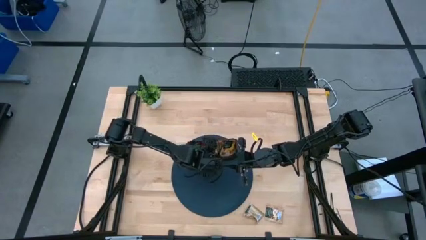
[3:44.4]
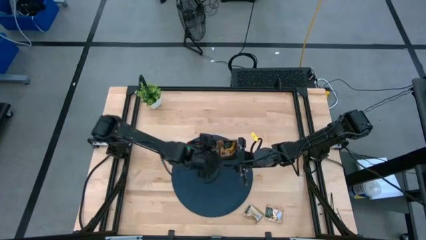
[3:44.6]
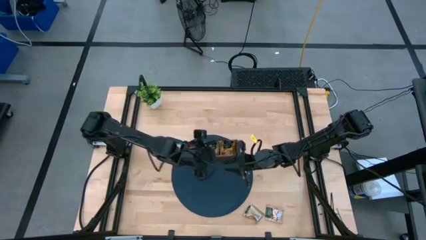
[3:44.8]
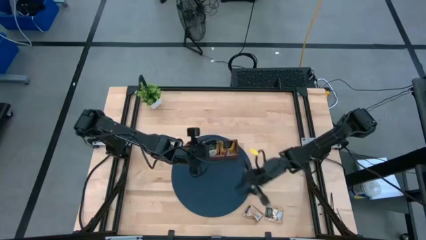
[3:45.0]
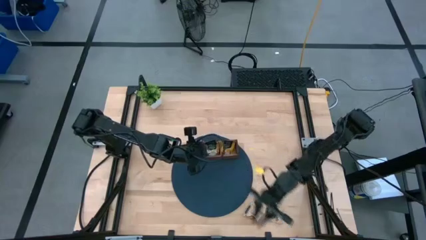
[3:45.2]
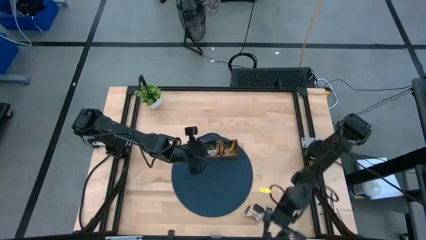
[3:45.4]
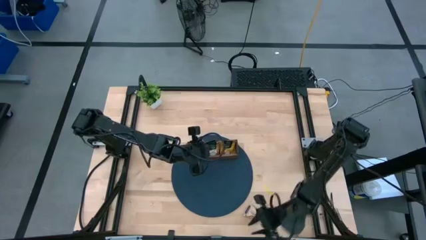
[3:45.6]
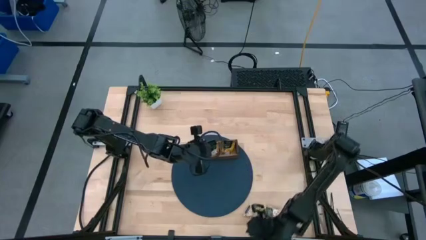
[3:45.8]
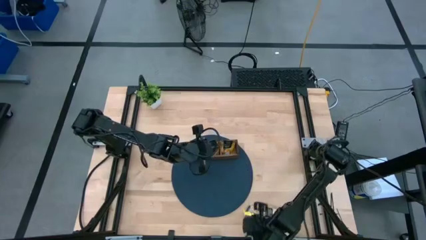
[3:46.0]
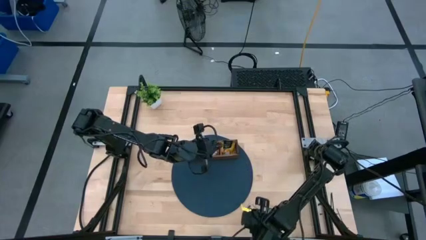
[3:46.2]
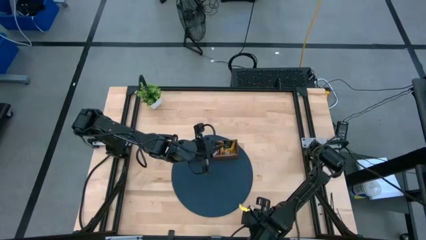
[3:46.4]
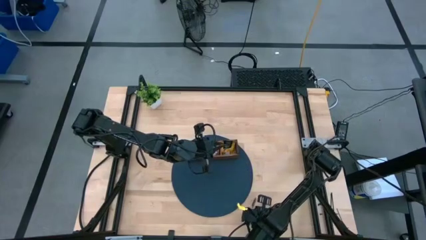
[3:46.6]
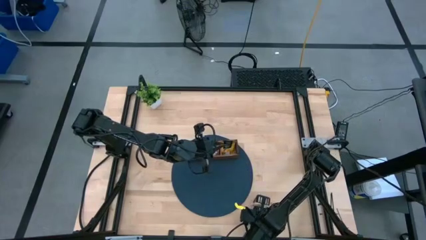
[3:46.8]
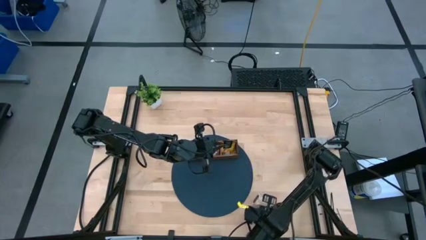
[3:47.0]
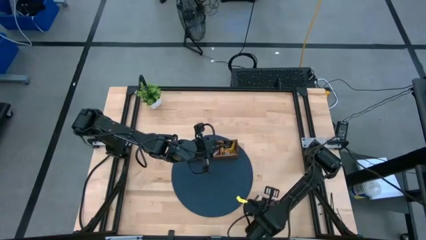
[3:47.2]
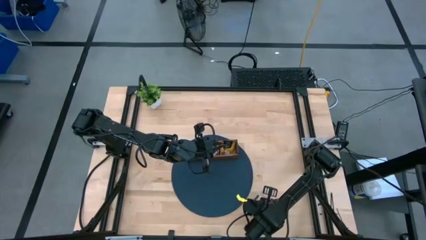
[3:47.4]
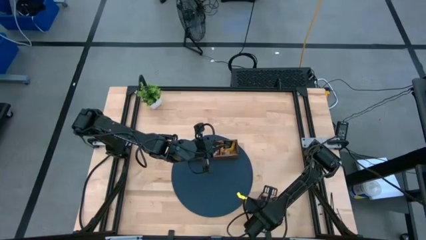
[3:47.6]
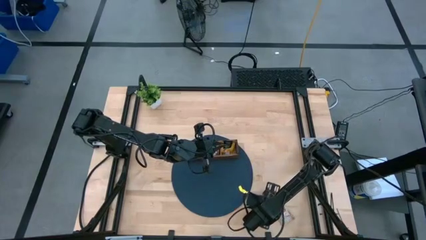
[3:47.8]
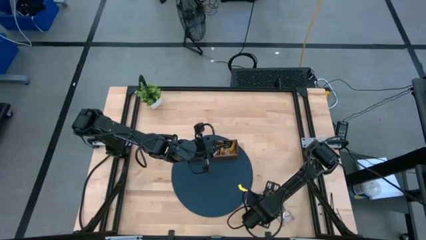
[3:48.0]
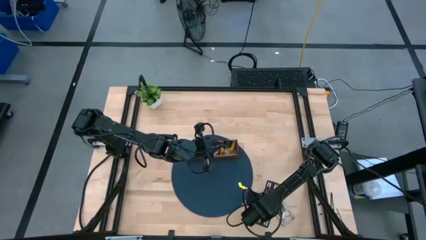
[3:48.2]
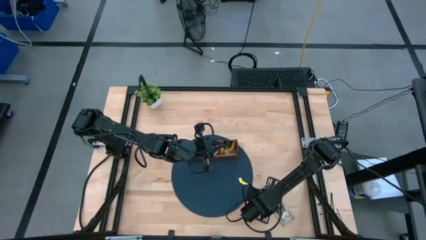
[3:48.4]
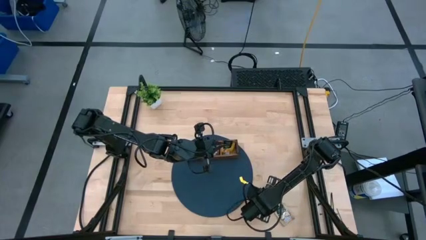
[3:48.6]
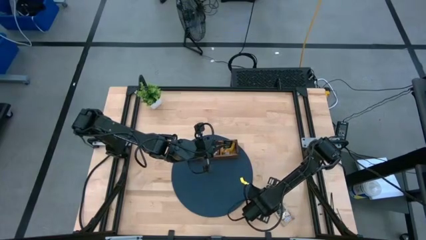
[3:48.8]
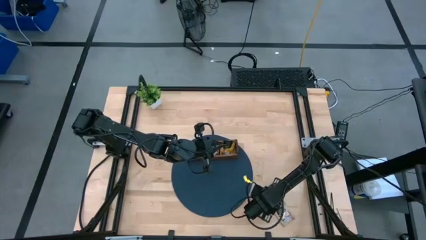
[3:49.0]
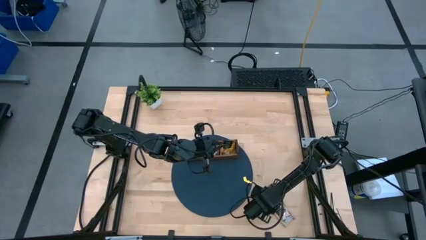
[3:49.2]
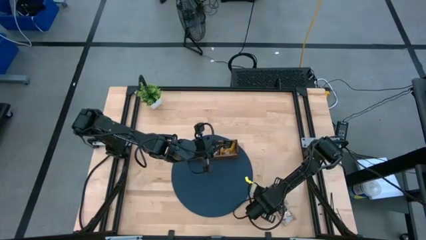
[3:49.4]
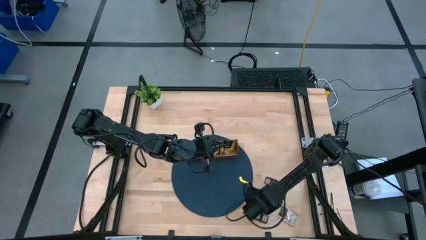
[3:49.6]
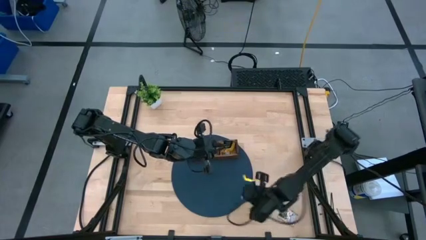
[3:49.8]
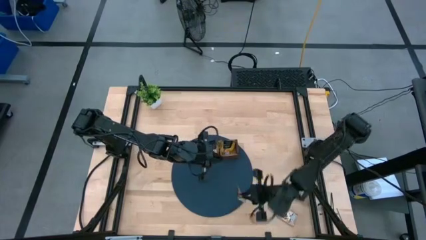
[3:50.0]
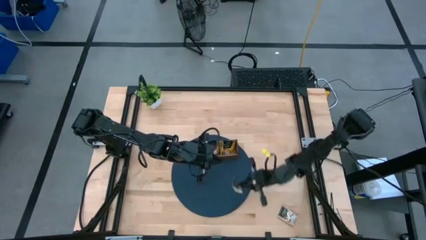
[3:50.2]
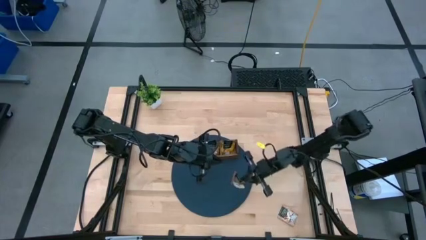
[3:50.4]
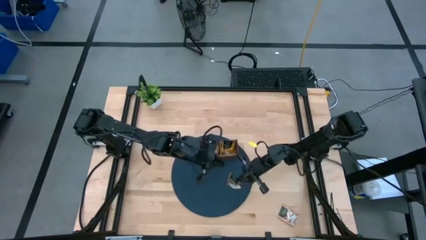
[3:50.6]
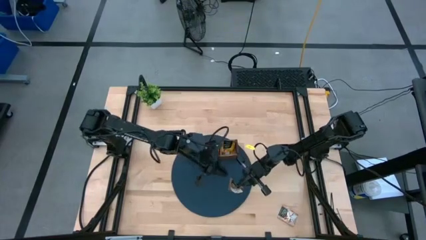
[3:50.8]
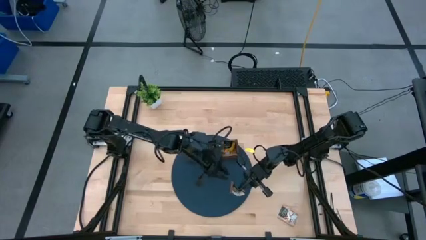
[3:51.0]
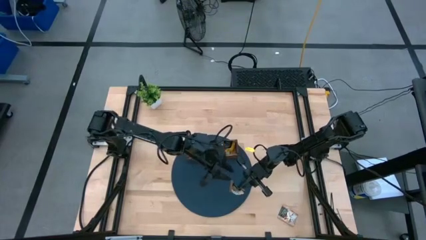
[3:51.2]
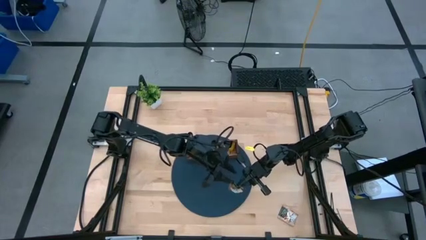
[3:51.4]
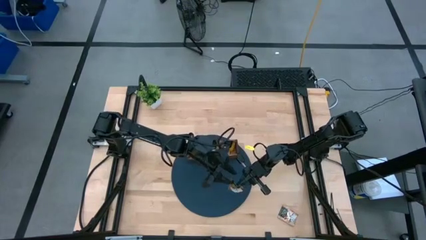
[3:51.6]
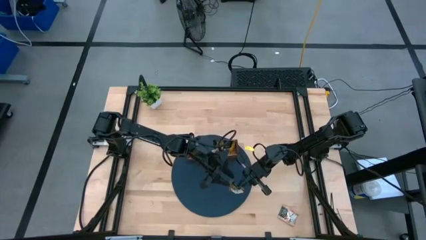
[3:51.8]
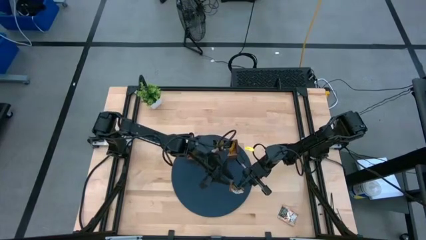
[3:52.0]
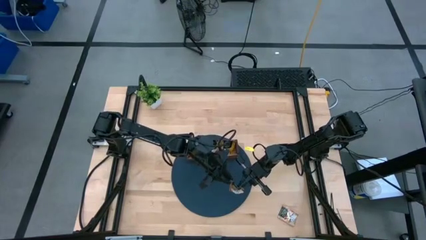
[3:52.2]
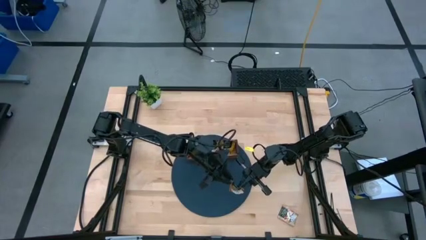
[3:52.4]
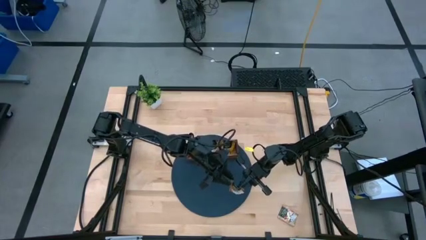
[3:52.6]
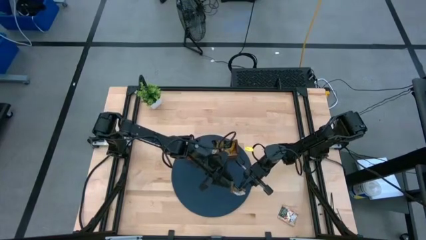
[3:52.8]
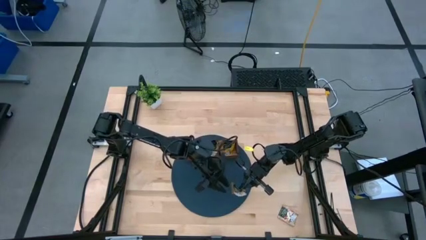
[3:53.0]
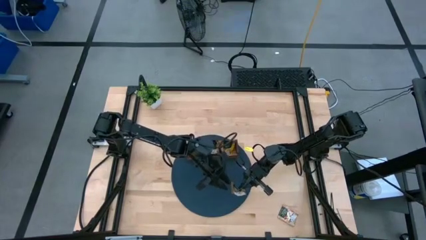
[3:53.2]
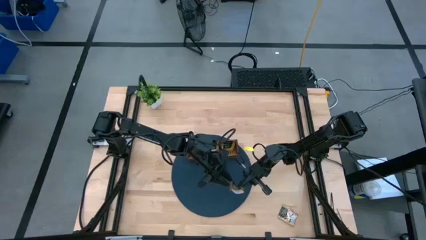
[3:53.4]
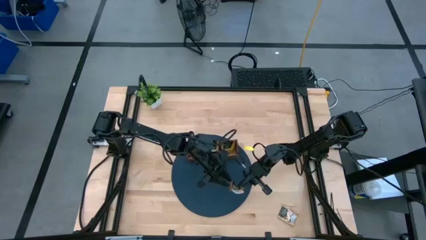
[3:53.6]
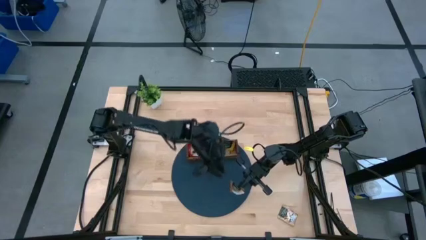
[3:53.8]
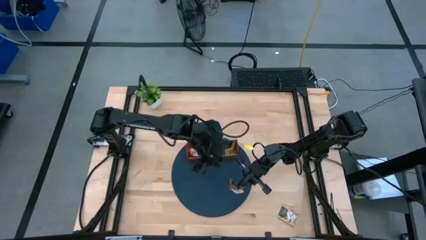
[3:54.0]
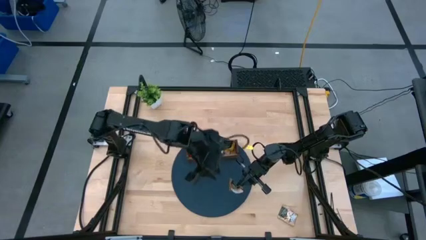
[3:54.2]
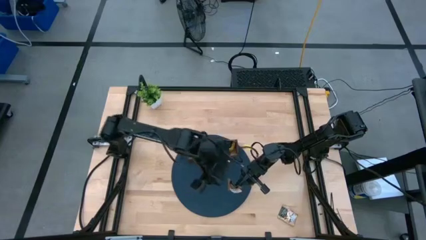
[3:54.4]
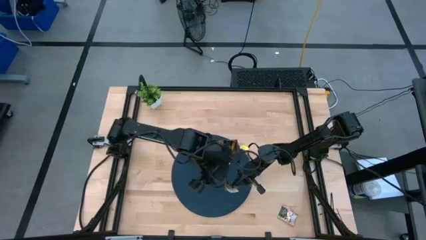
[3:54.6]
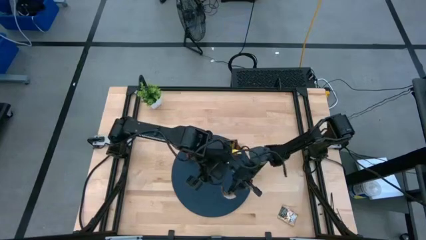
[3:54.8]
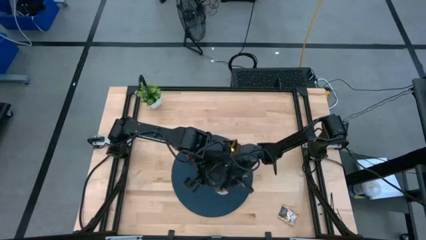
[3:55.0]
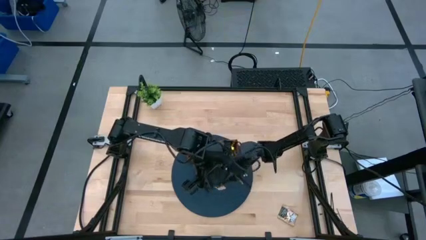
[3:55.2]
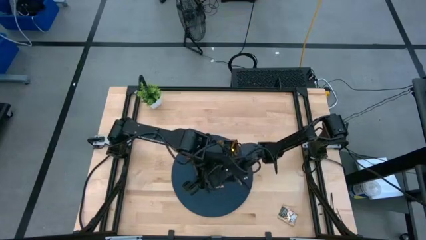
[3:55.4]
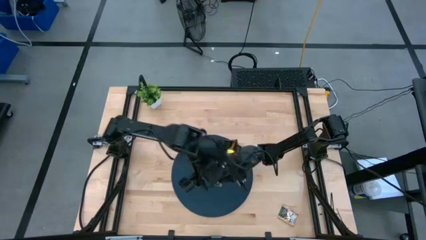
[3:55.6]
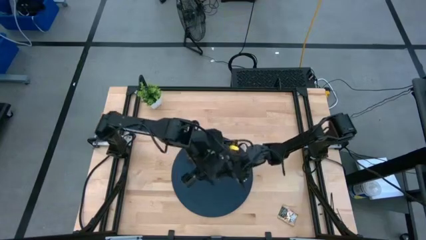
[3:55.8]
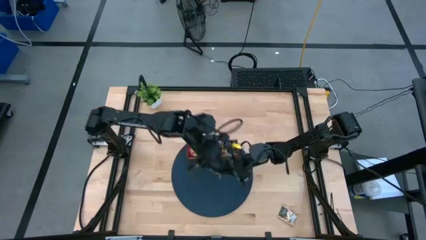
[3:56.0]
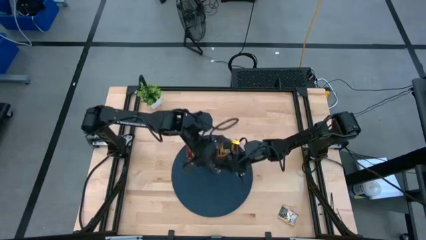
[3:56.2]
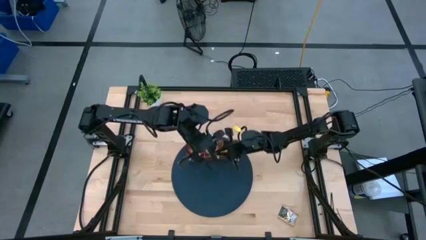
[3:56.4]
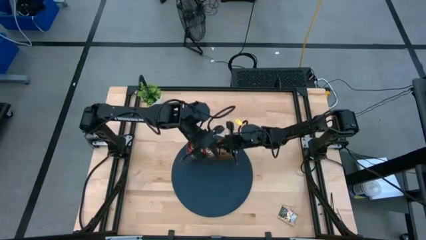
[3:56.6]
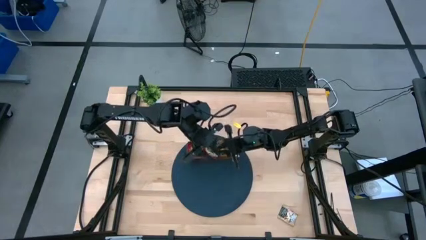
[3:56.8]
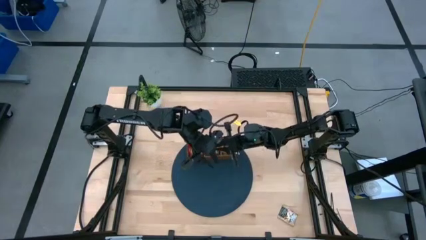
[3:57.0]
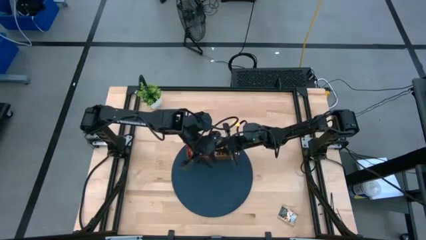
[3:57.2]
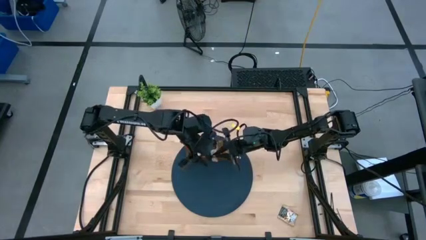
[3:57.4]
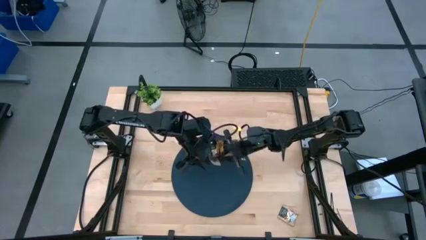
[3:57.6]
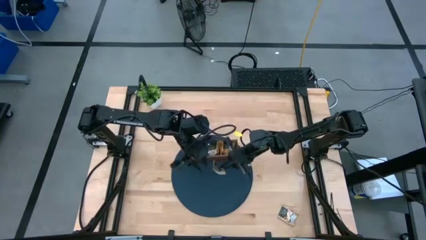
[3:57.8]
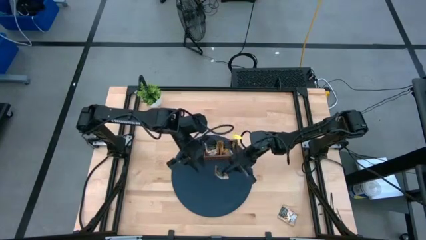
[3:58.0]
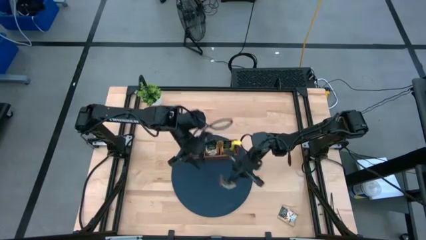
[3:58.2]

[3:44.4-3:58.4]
Task: Pick & Place Tea
Put the left brown tea bag into the middle section of the wooden organizer
